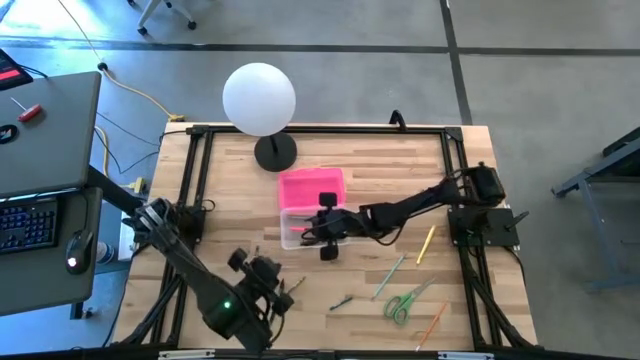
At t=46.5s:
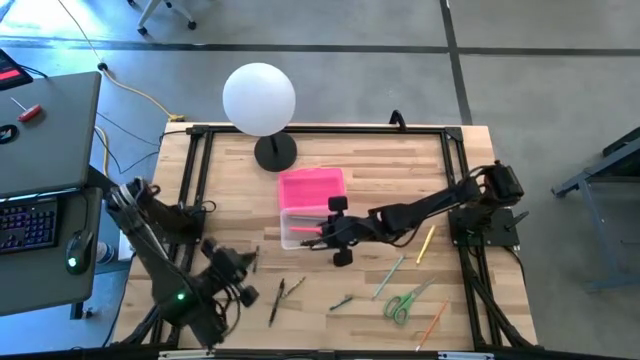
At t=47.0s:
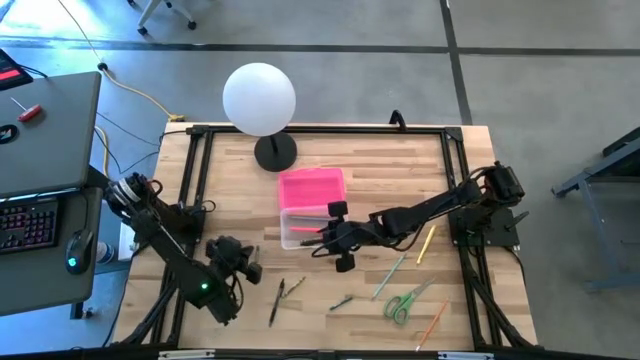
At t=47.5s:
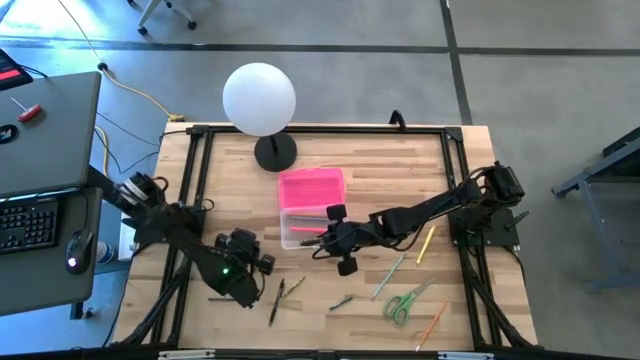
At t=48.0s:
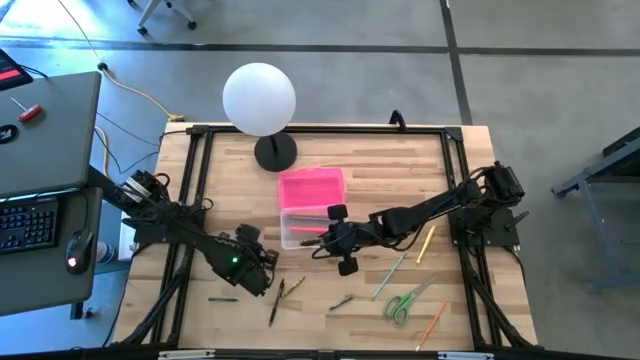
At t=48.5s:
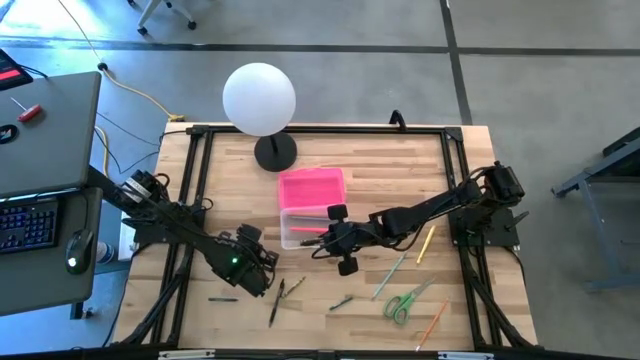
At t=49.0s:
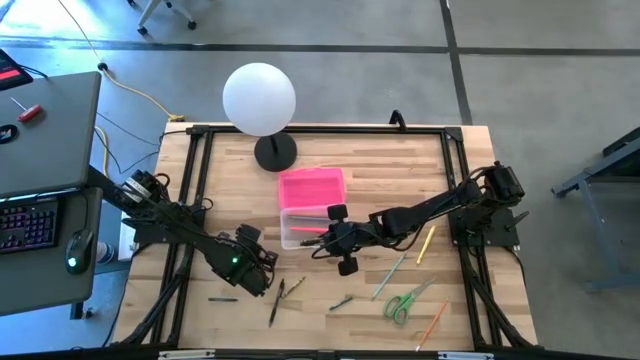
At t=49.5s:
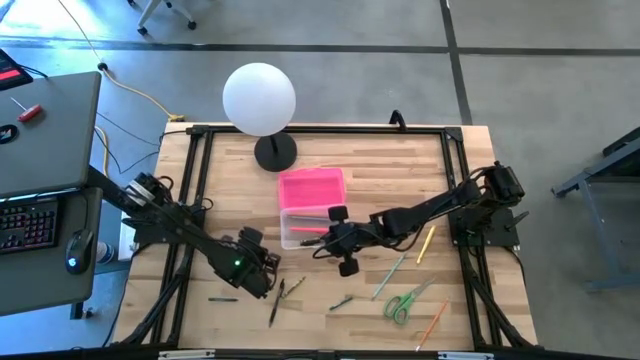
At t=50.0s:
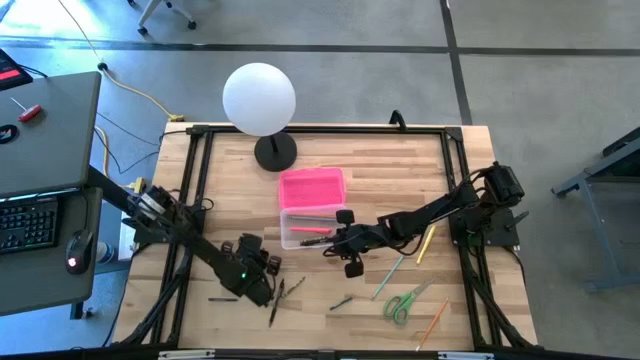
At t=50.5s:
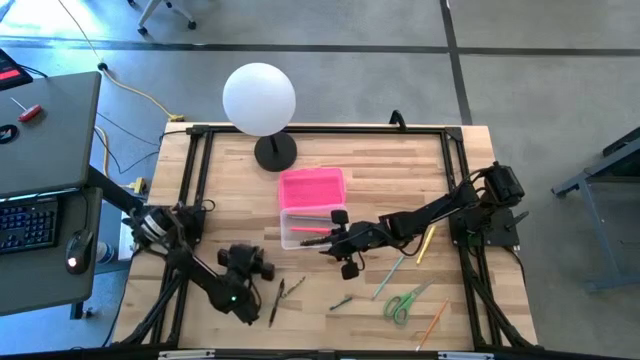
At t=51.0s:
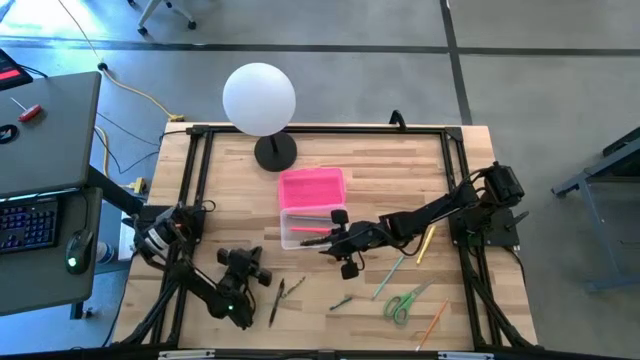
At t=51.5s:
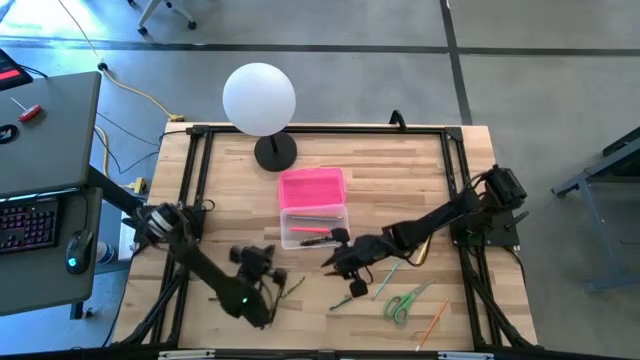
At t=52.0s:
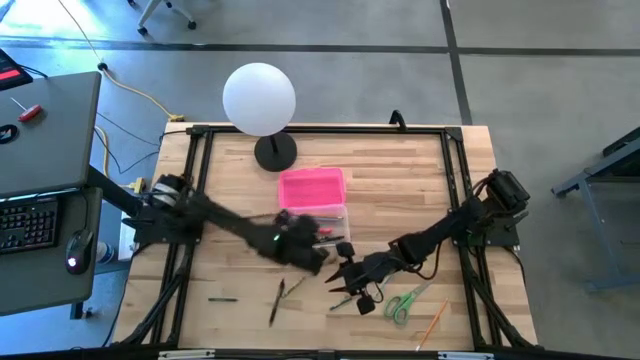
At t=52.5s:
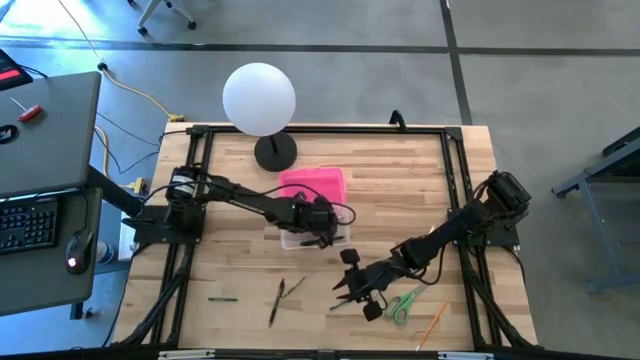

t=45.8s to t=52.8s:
Task: Pick & place school supplies into a supply box
Put the top left green crayon into the pink supply box

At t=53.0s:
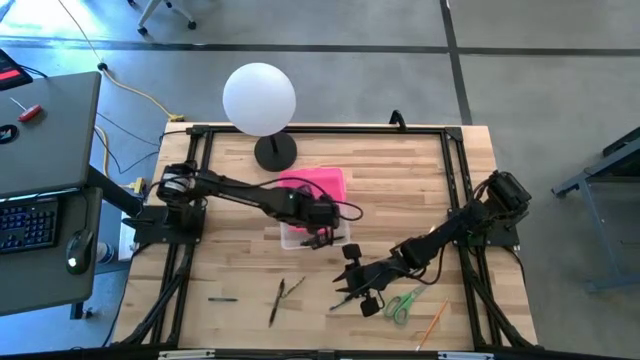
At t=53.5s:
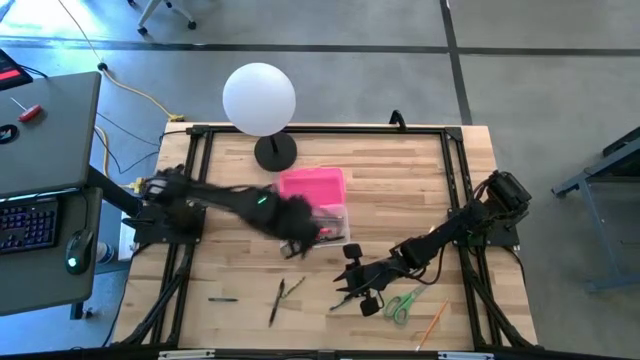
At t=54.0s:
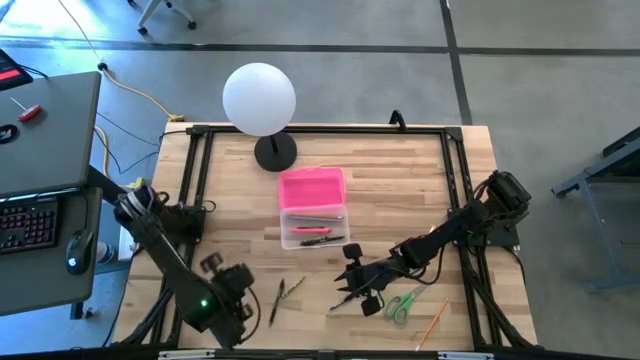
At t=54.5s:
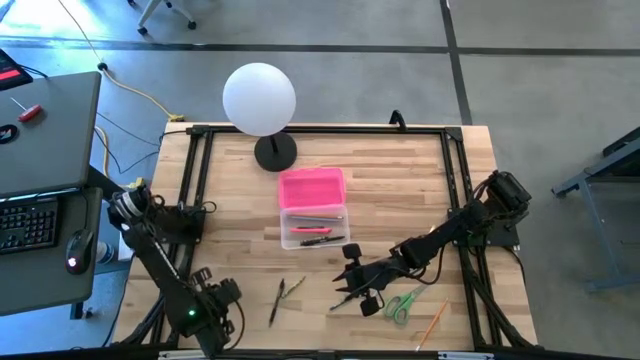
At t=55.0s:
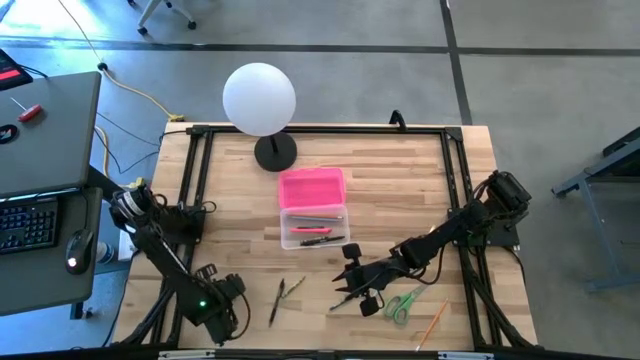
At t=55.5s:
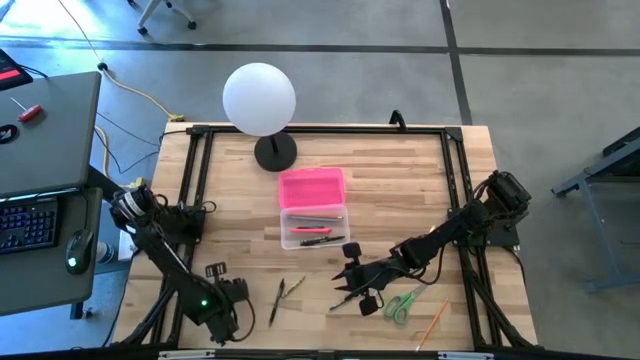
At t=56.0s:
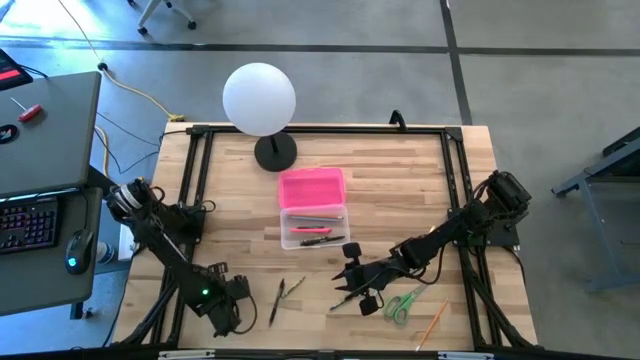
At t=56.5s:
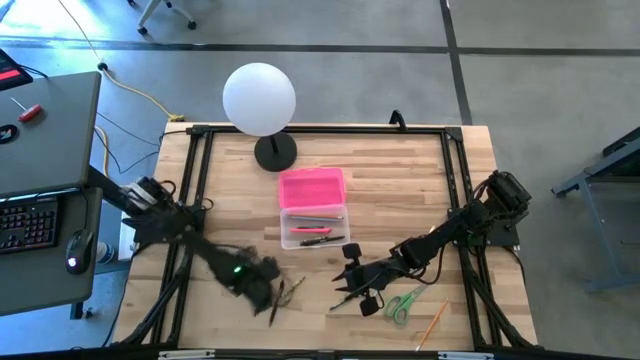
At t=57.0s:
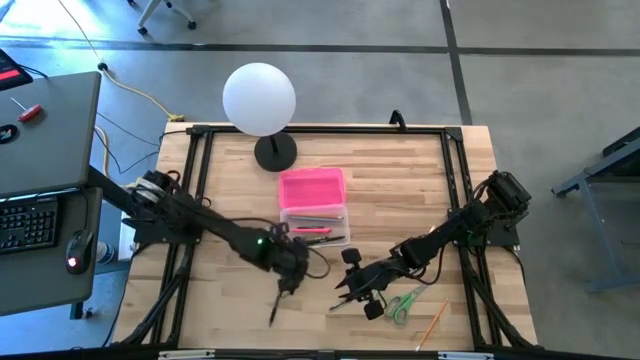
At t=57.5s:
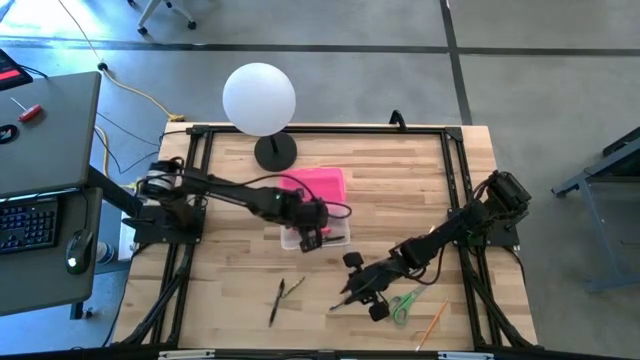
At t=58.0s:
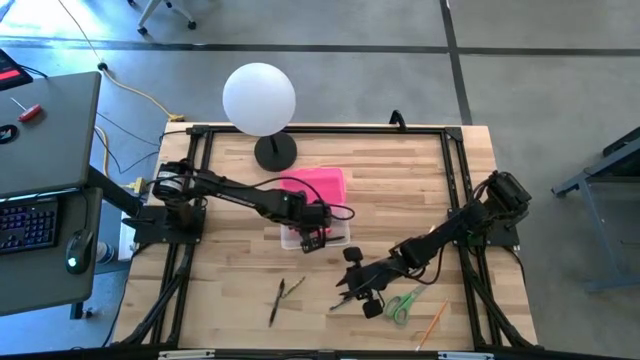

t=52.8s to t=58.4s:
Put the left green crayon into the pink supply box

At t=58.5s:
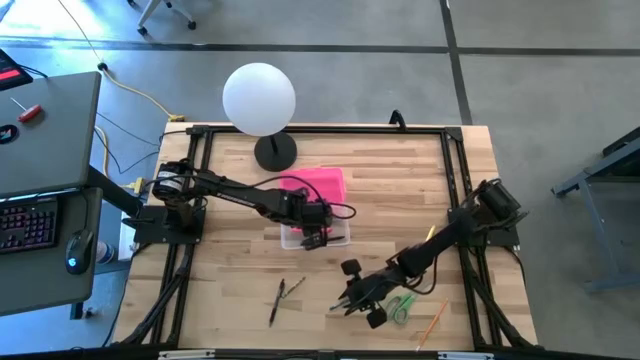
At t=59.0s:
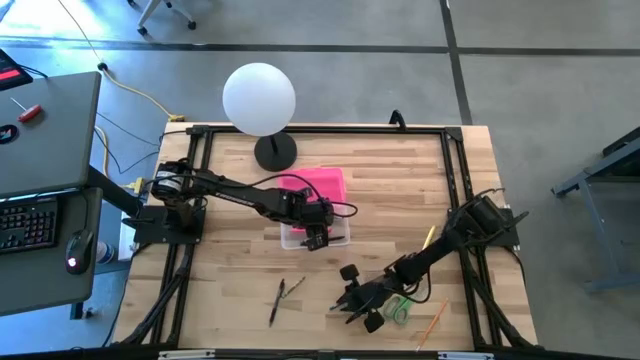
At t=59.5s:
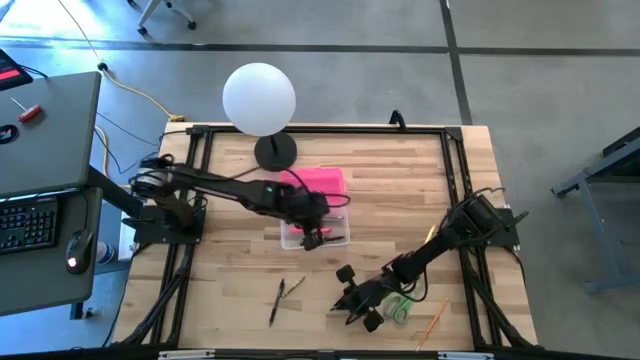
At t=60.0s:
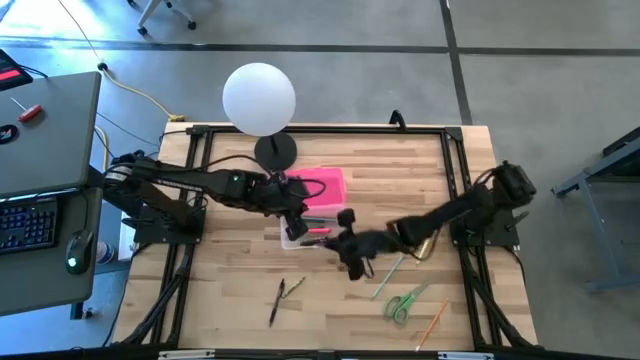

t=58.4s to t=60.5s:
Put the green crayon into the pink supply box

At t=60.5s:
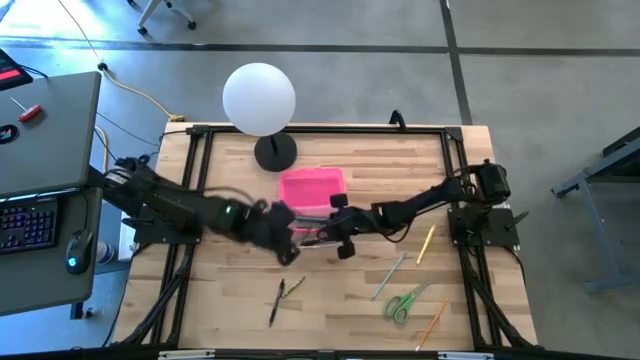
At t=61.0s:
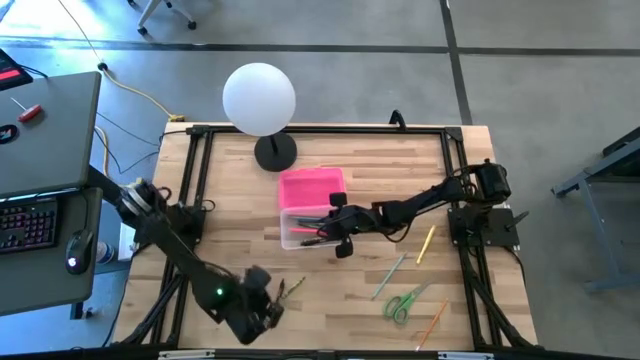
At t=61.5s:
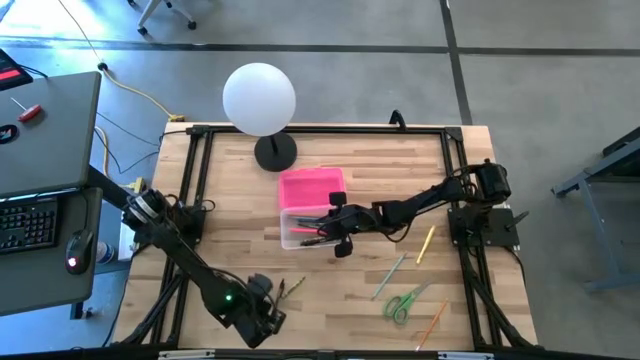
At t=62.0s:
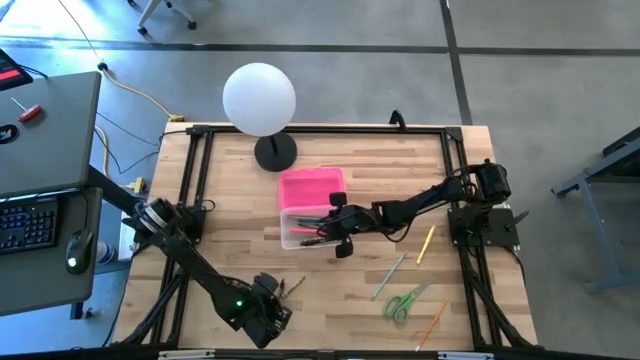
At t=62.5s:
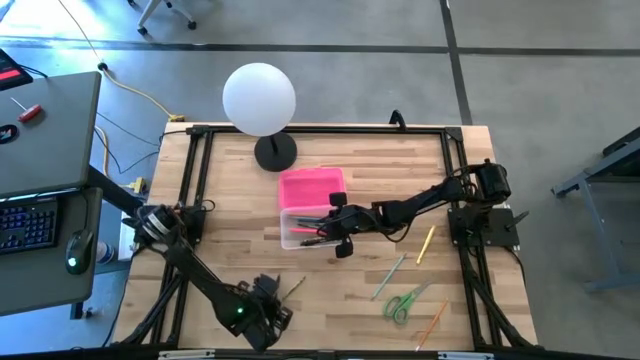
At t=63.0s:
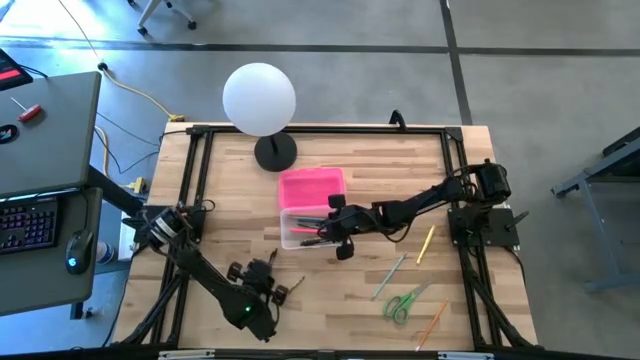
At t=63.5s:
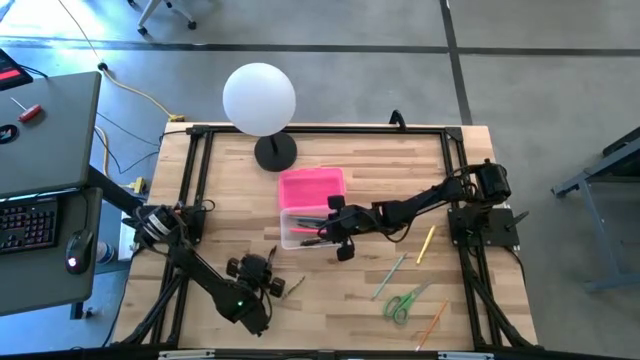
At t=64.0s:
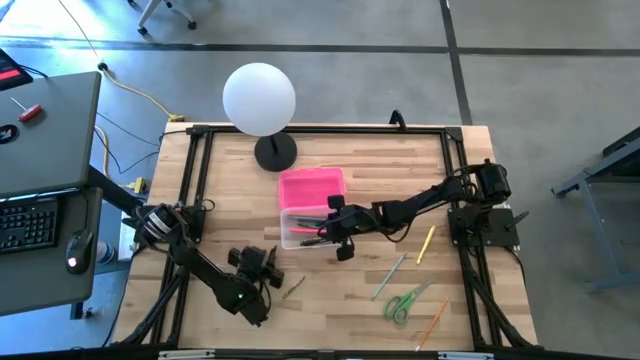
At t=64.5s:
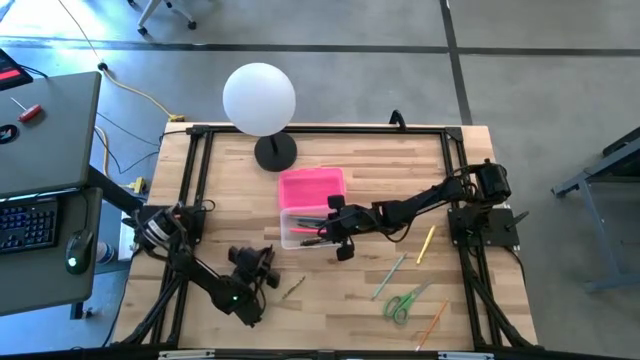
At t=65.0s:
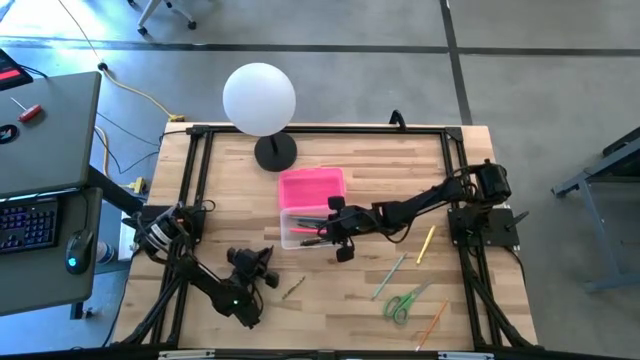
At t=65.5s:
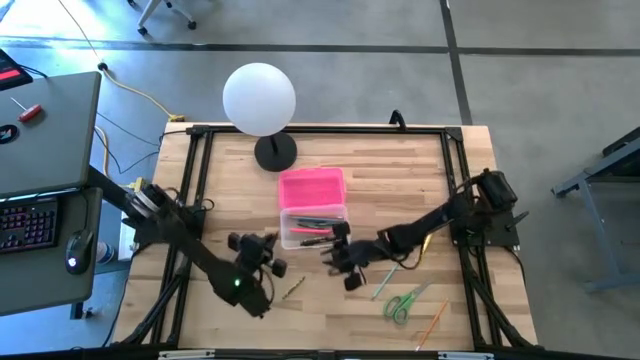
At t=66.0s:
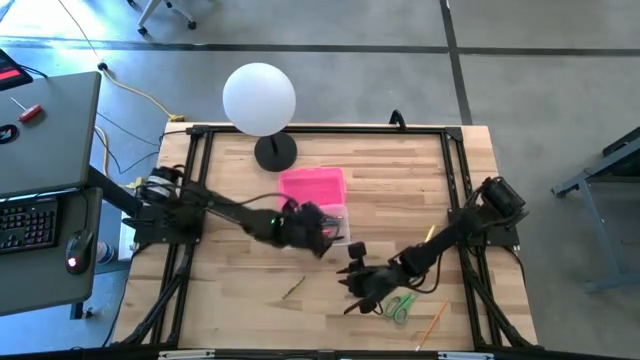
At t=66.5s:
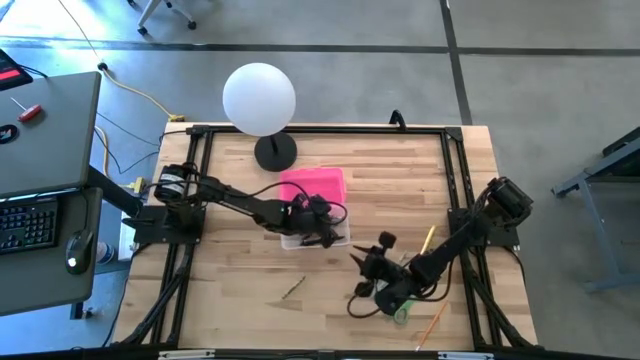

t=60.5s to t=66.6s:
Put the black pen into the pink supply box

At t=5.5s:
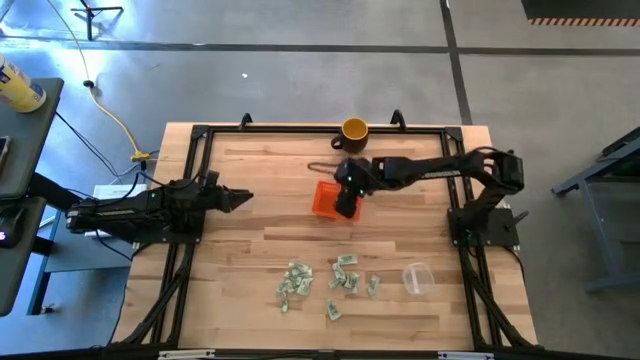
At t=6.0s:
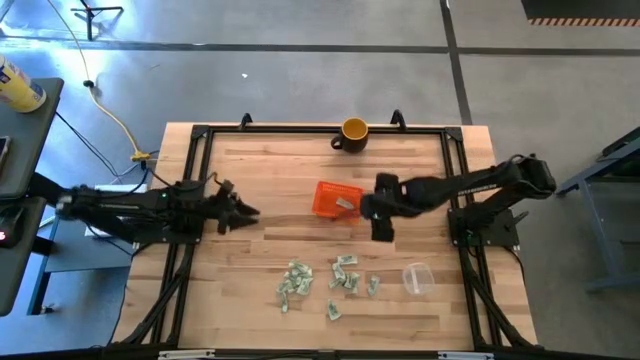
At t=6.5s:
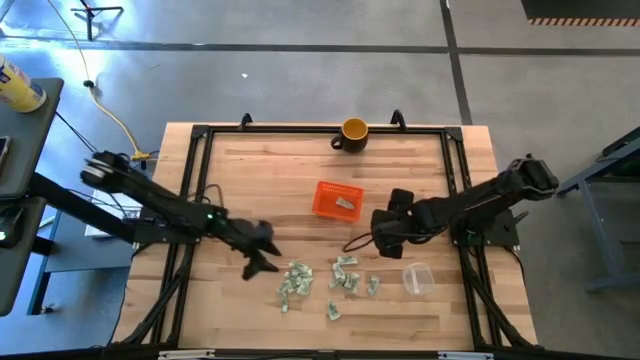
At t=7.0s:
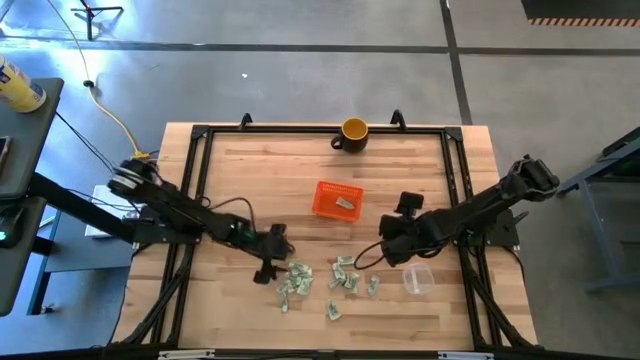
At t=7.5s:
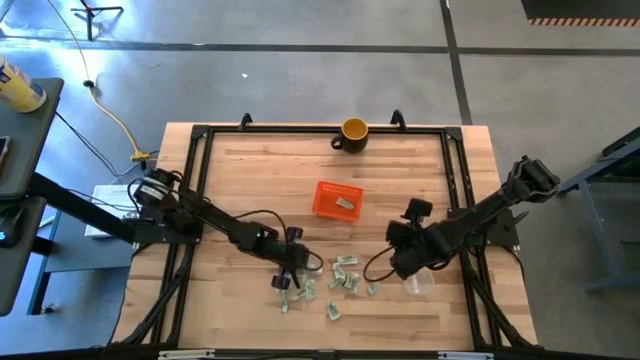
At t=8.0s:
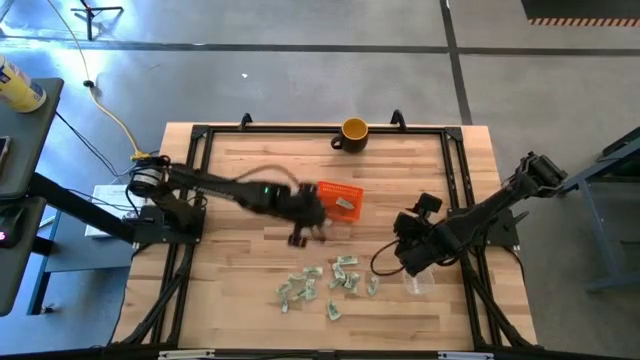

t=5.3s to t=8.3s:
Task: Pick and place items into bin
Put the white stevia packet into the orange bin
